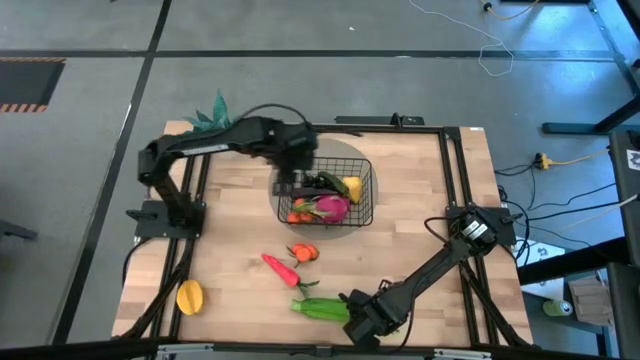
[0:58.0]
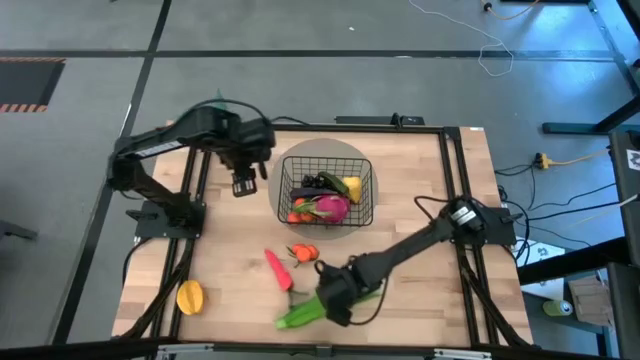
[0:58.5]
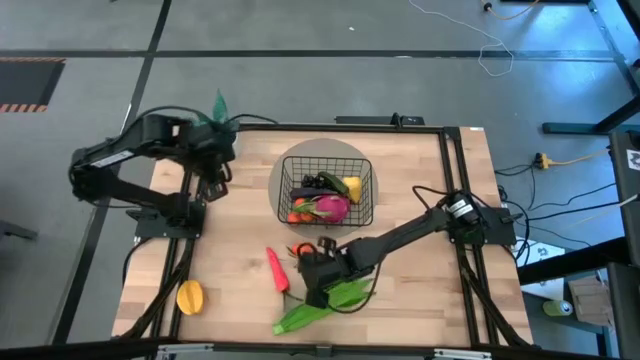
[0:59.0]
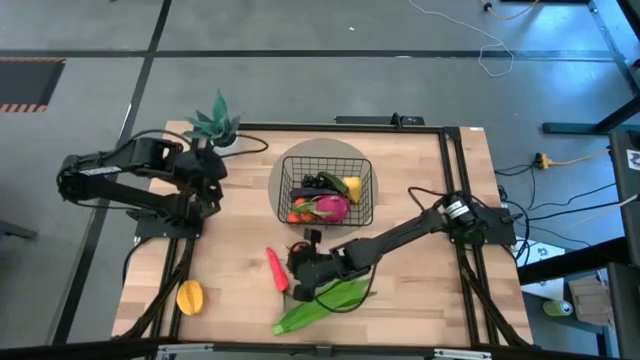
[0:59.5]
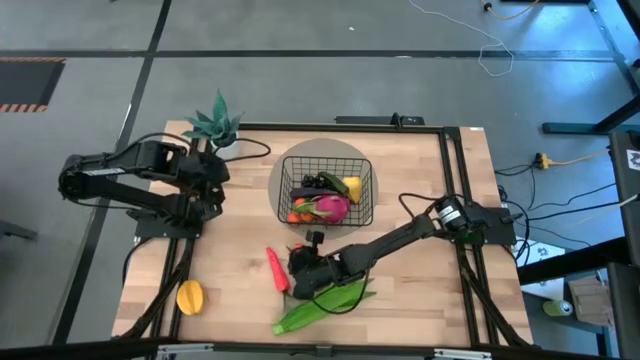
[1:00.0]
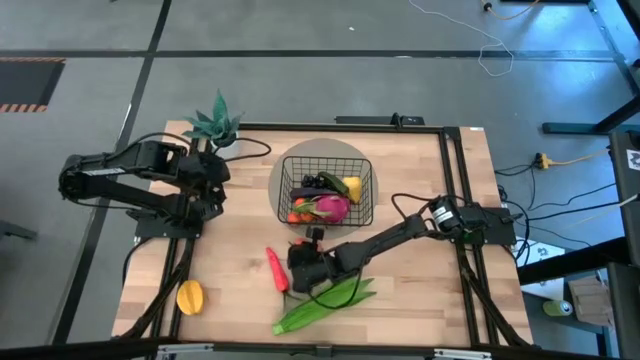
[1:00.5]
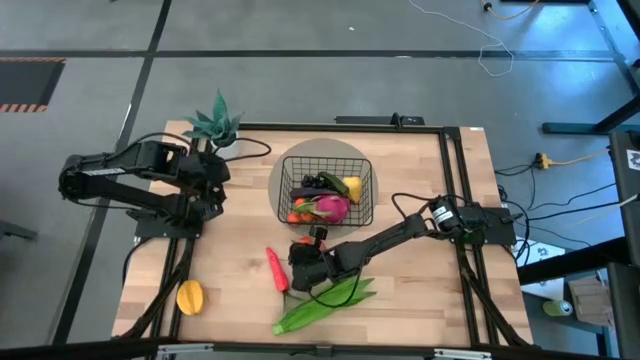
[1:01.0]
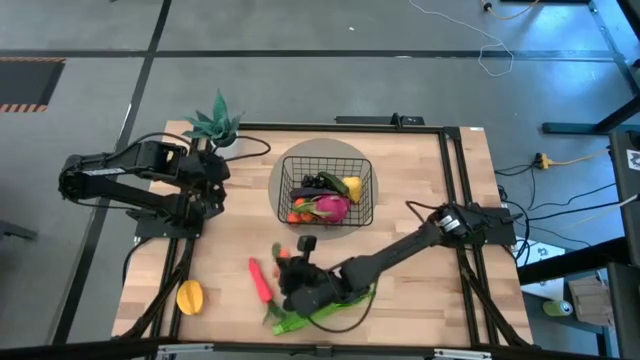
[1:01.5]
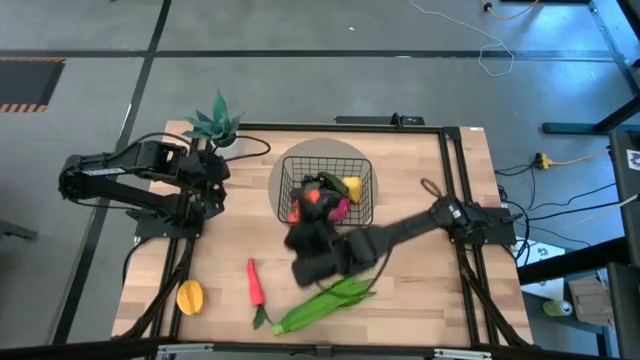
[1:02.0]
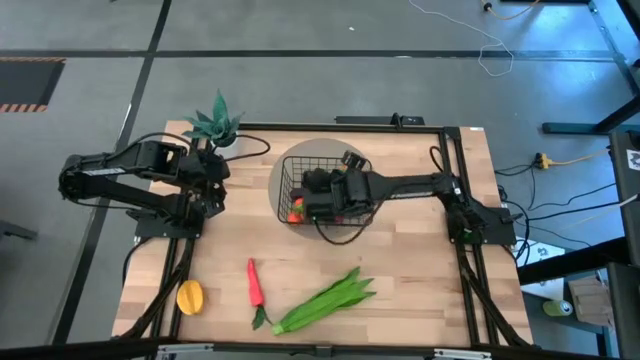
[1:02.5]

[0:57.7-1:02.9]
Task: Build produce basket
Put the oranges into the black wire basket

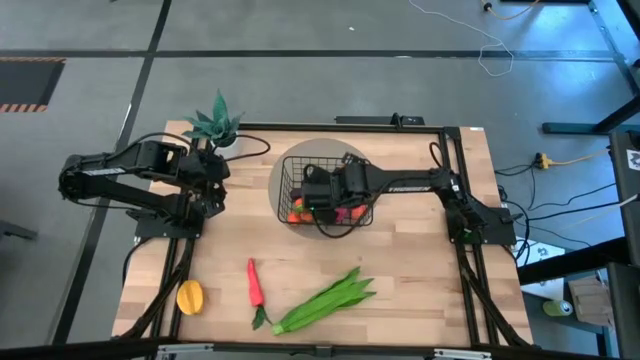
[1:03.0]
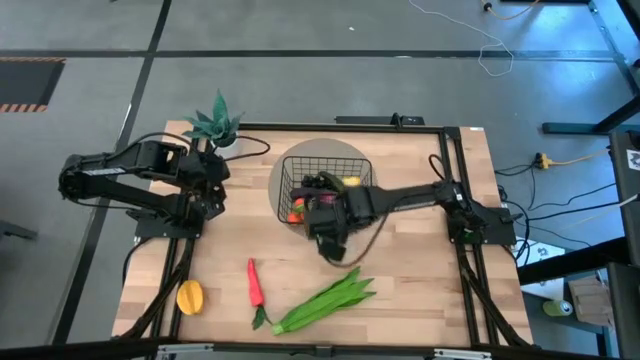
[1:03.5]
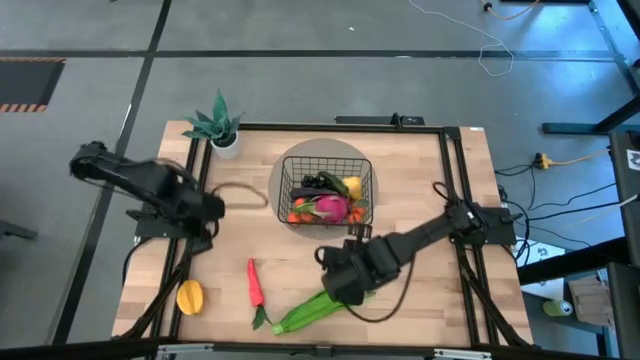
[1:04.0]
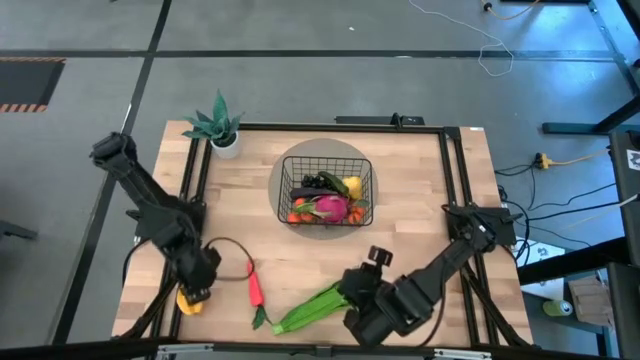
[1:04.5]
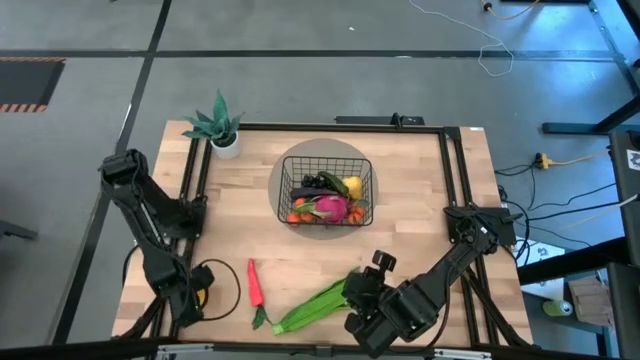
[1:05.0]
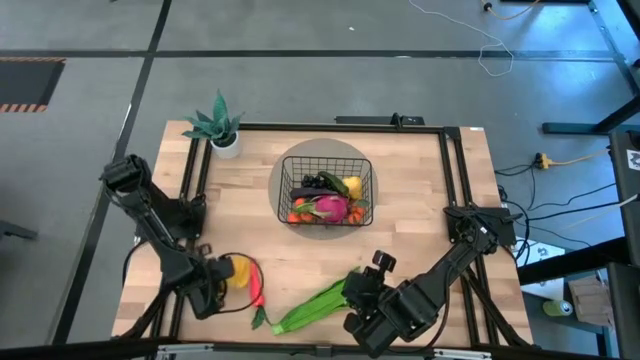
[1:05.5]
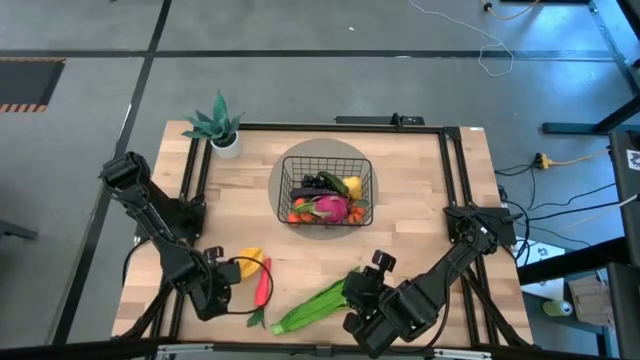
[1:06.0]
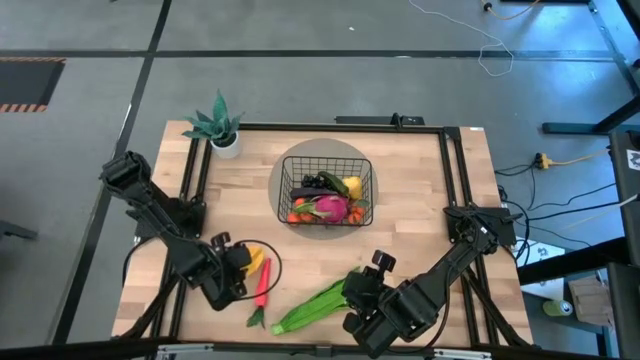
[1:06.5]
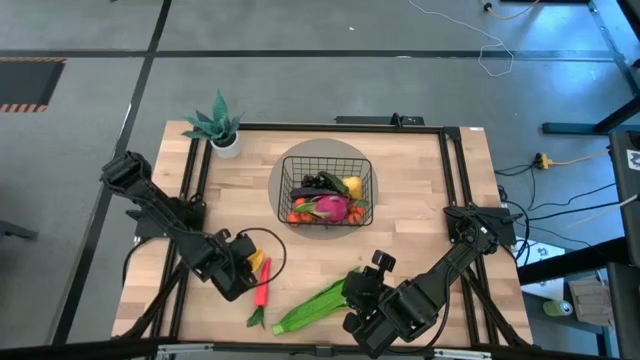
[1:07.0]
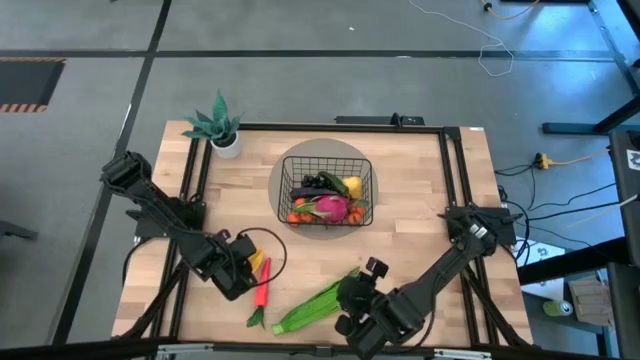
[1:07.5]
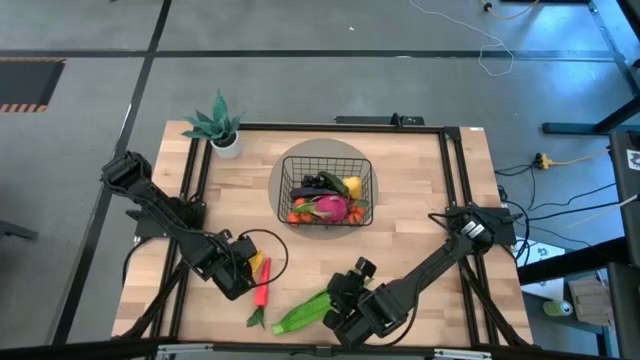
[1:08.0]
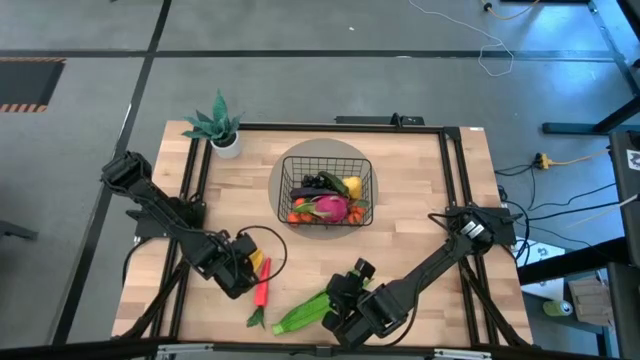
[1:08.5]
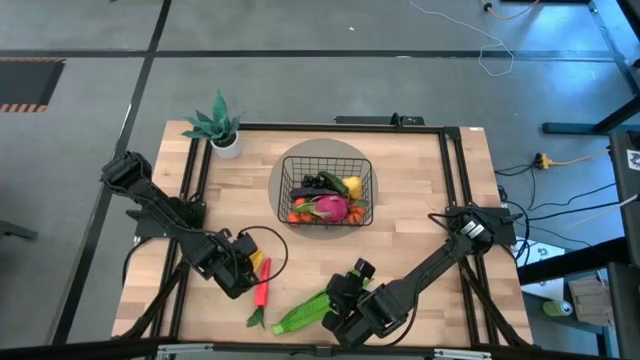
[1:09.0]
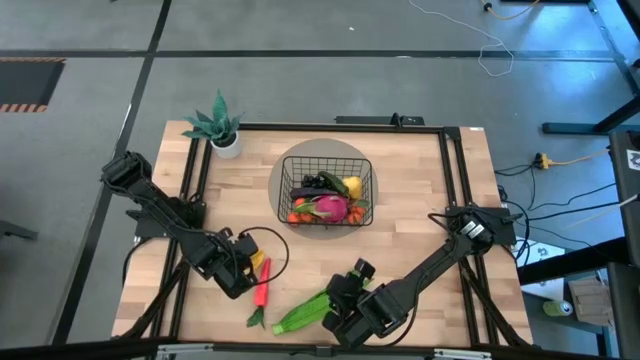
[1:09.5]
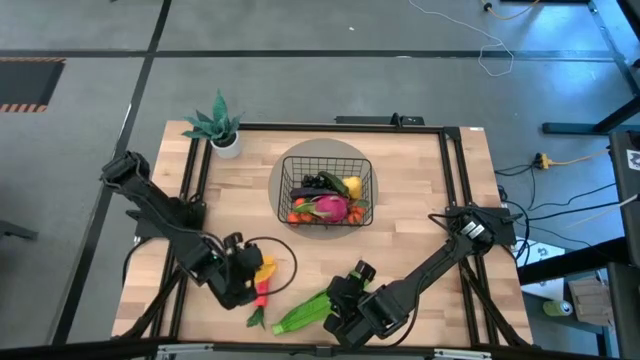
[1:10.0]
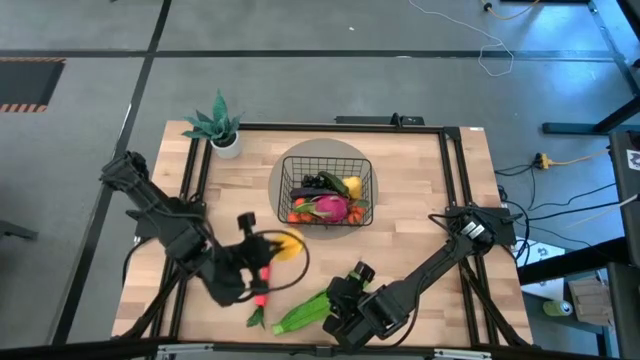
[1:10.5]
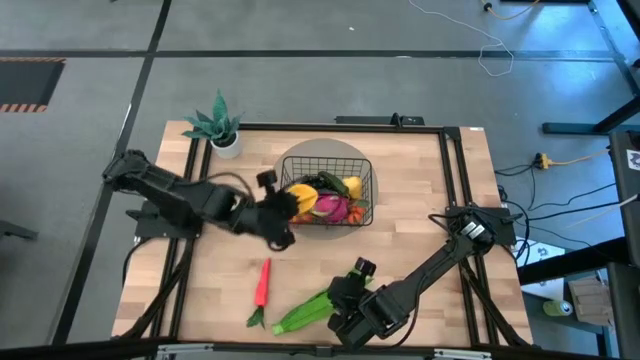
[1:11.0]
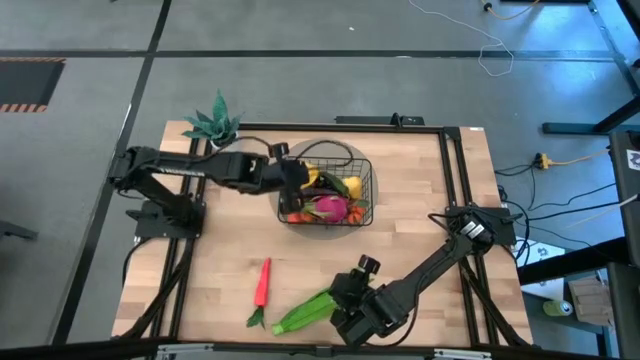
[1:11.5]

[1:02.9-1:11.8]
Put the star fruit into the black wire basket

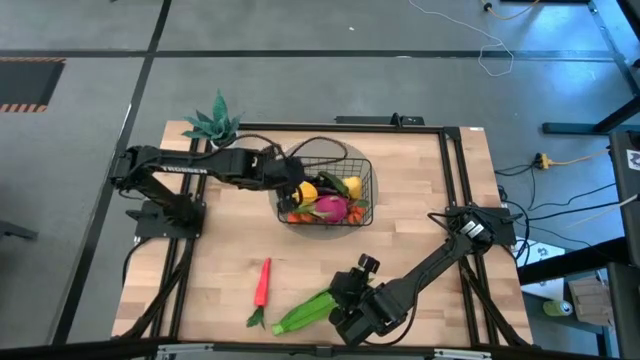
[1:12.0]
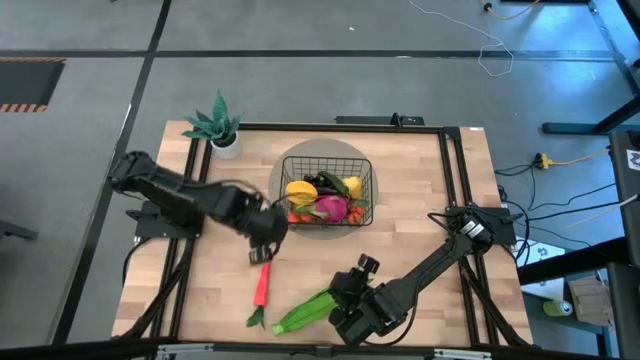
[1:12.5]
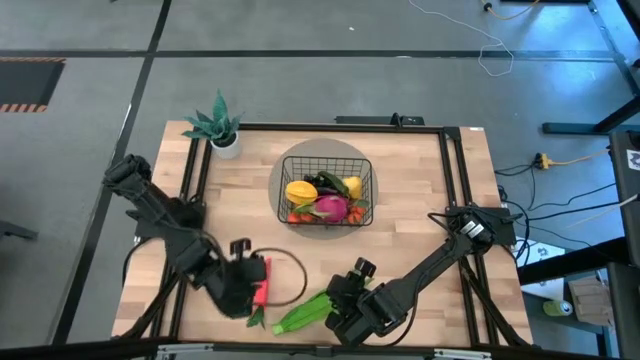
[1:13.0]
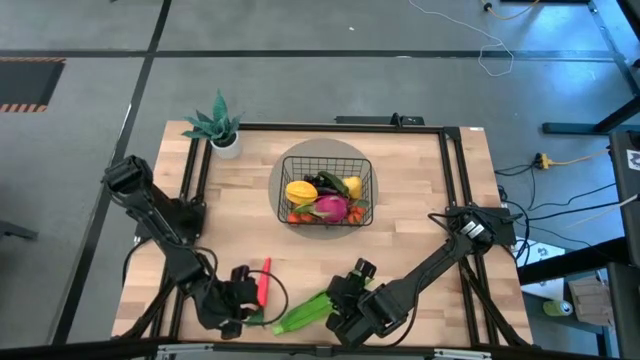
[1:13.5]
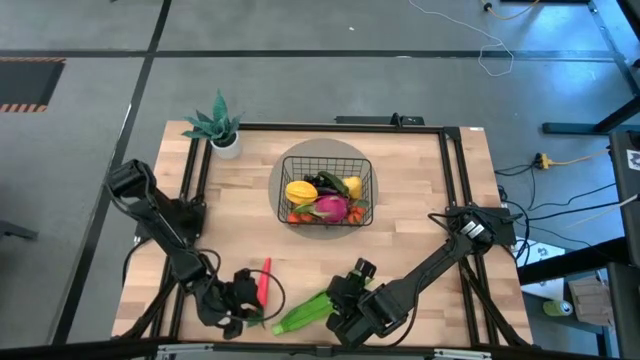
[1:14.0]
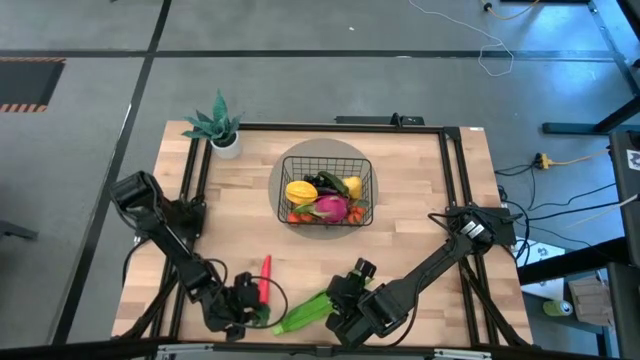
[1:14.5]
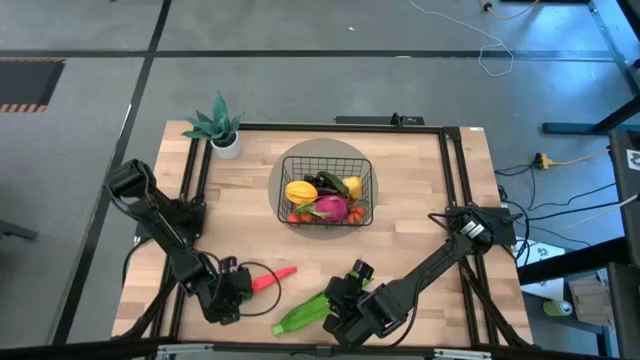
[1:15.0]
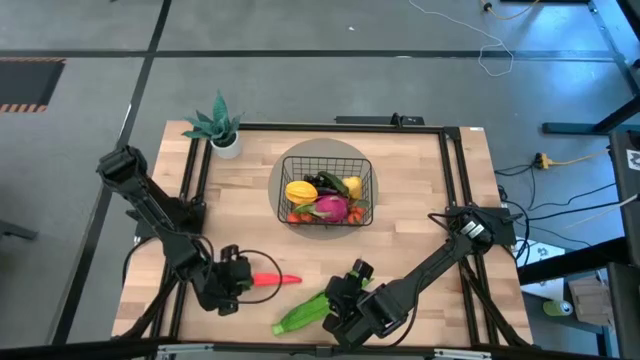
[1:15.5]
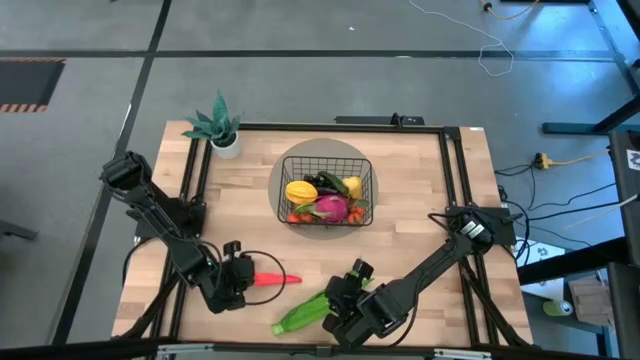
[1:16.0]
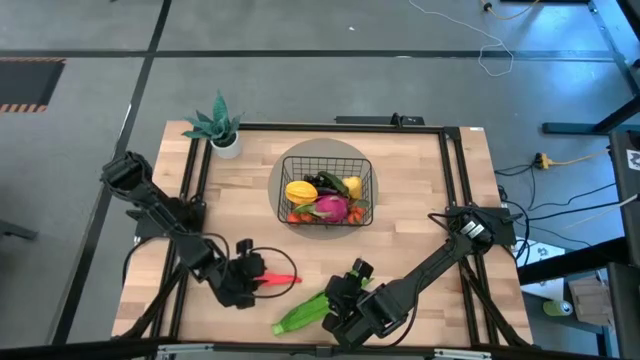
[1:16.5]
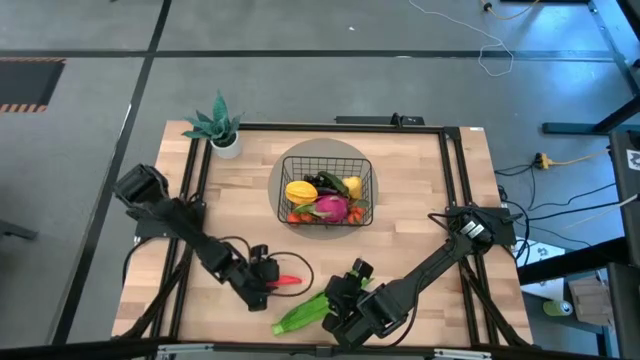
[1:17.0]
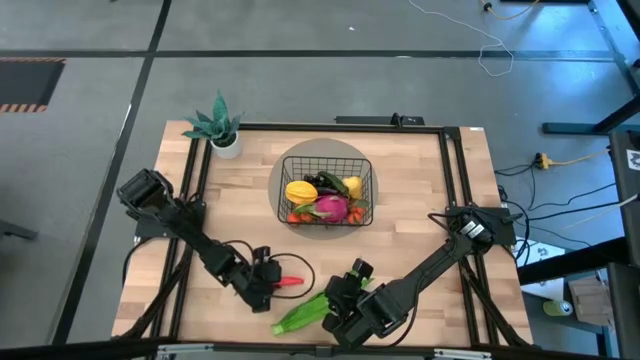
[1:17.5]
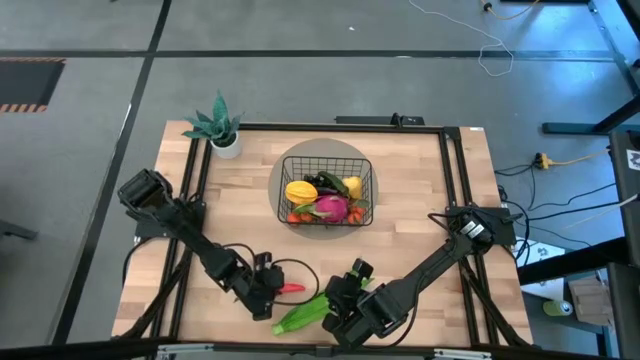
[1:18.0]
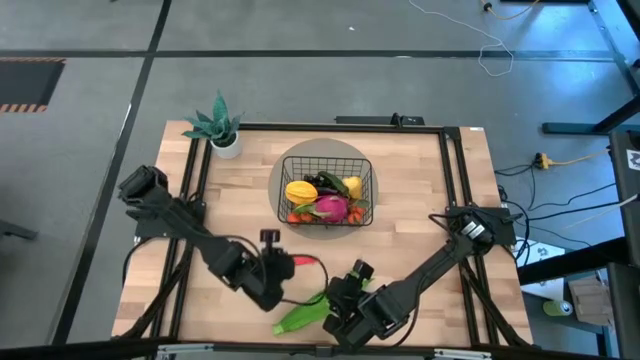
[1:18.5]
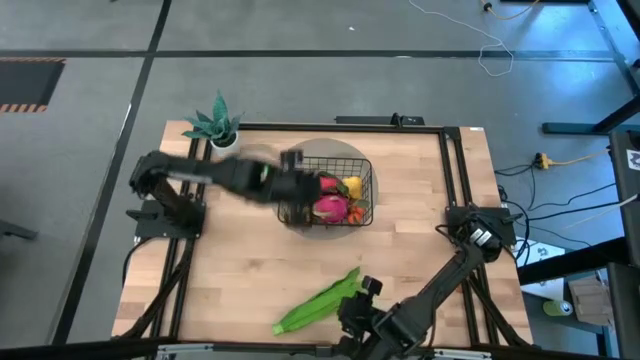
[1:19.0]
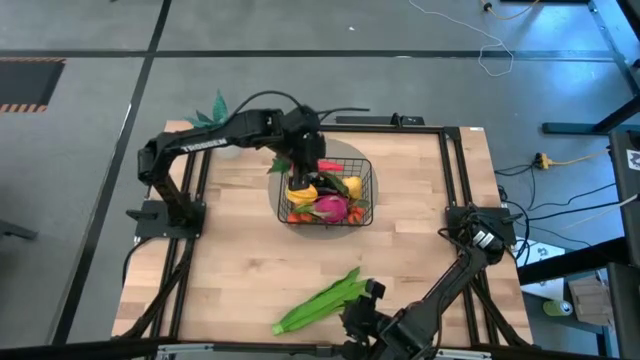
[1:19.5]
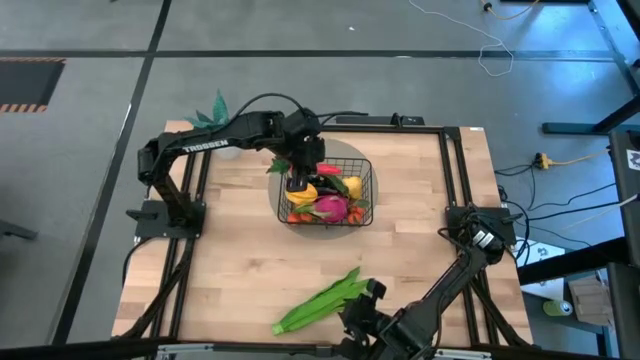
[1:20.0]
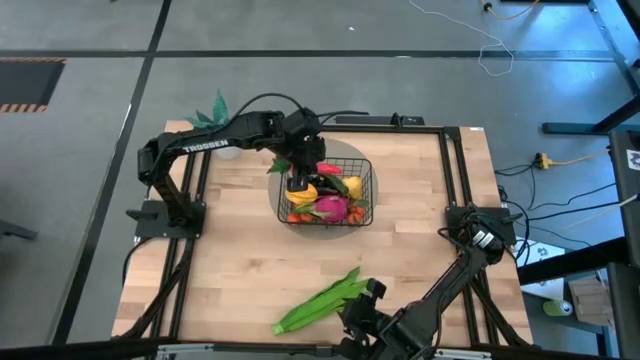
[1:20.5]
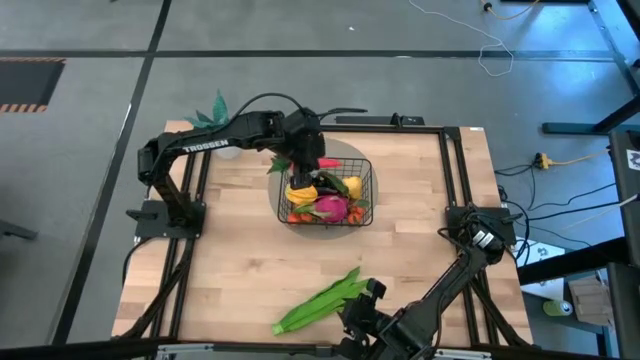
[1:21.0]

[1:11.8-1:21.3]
Put the carrot into the black wire basket
